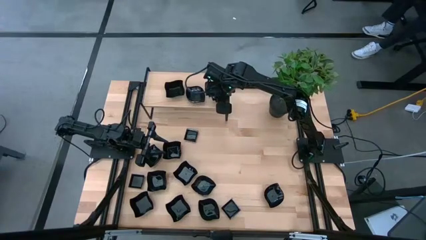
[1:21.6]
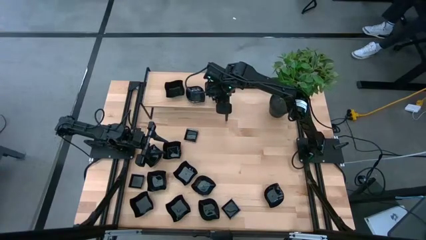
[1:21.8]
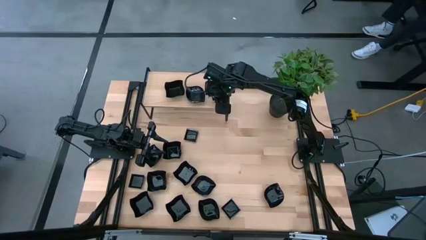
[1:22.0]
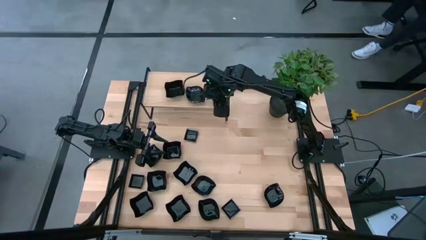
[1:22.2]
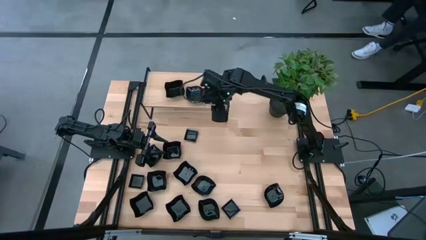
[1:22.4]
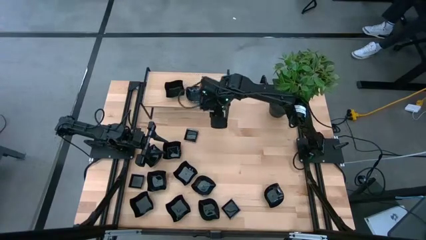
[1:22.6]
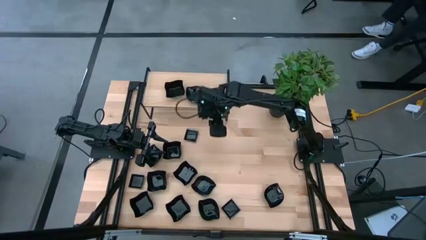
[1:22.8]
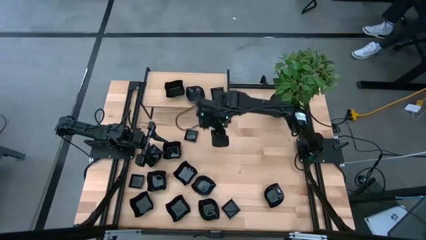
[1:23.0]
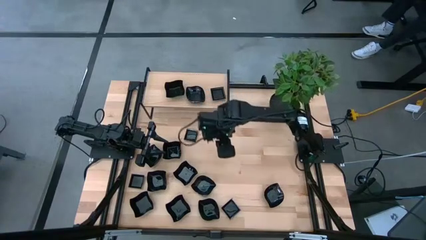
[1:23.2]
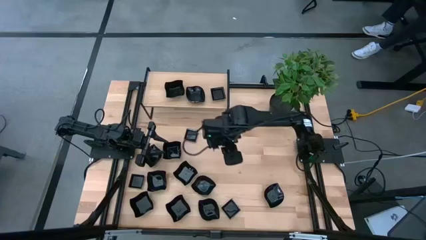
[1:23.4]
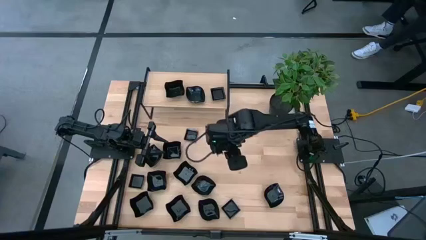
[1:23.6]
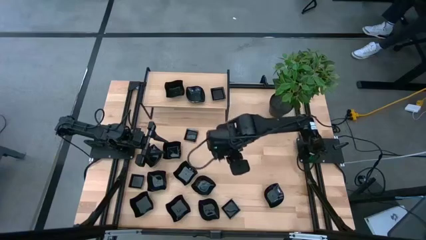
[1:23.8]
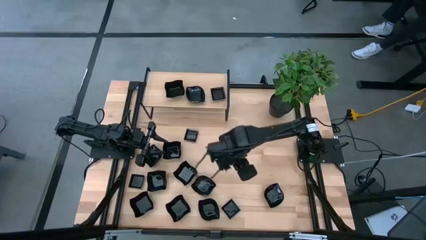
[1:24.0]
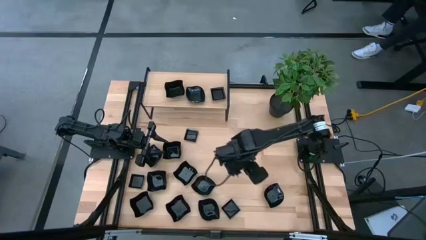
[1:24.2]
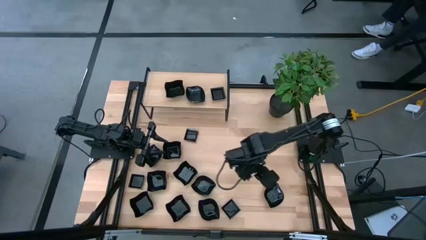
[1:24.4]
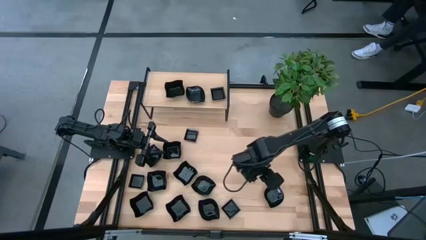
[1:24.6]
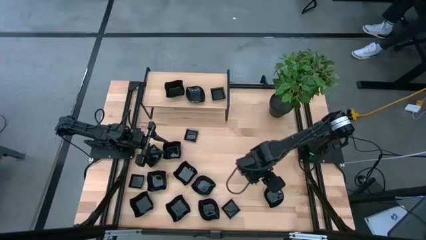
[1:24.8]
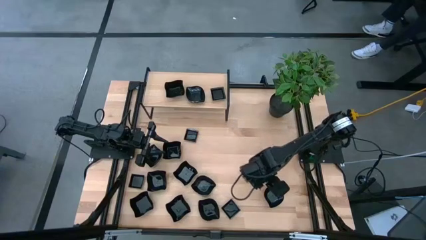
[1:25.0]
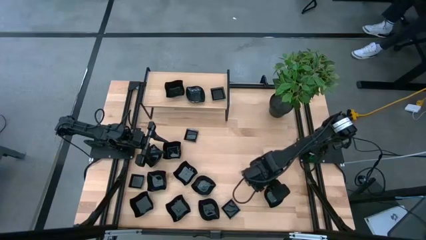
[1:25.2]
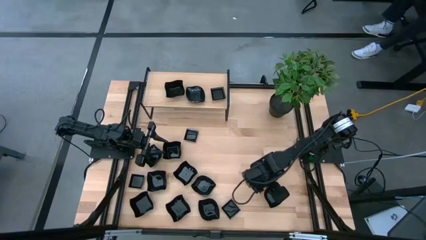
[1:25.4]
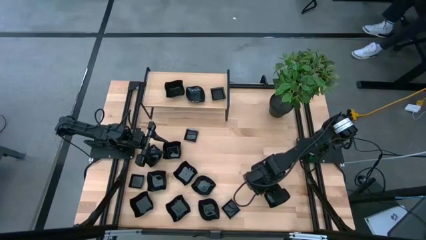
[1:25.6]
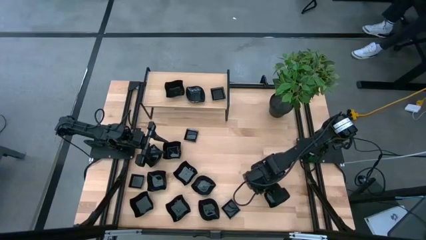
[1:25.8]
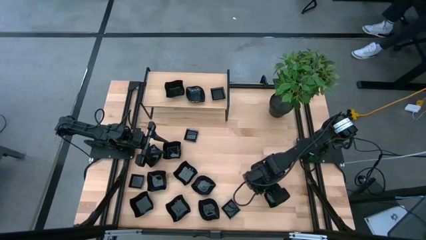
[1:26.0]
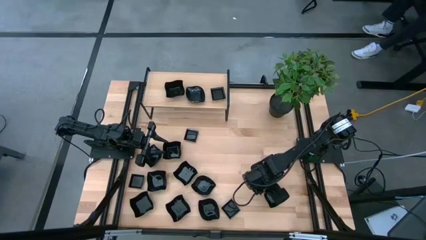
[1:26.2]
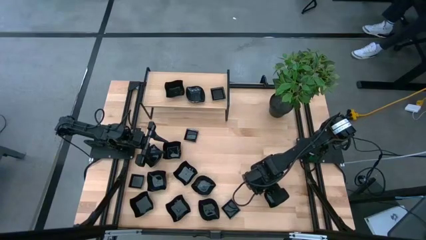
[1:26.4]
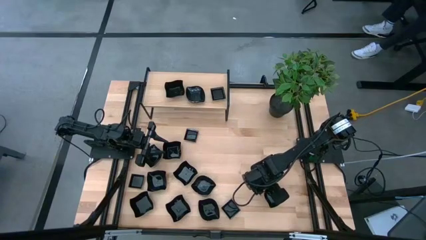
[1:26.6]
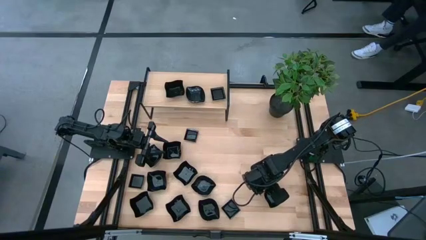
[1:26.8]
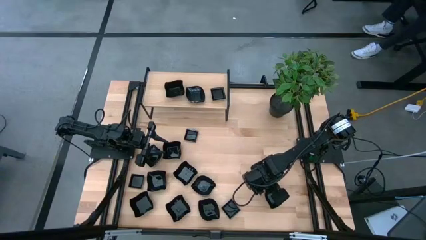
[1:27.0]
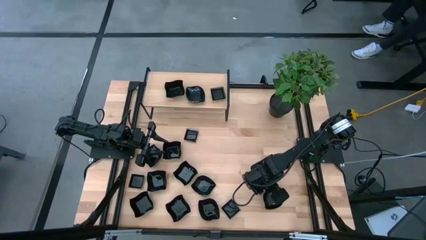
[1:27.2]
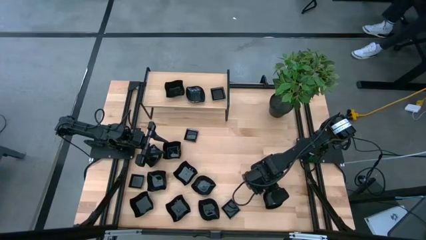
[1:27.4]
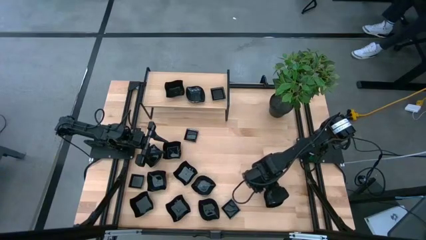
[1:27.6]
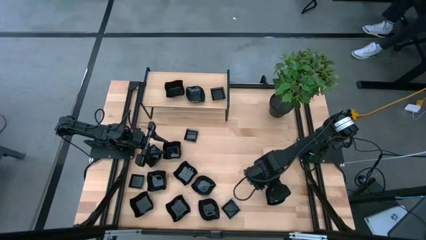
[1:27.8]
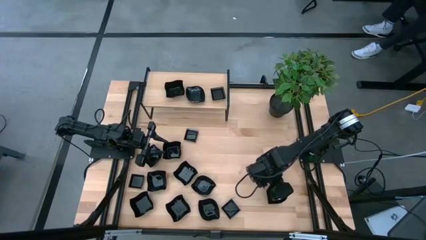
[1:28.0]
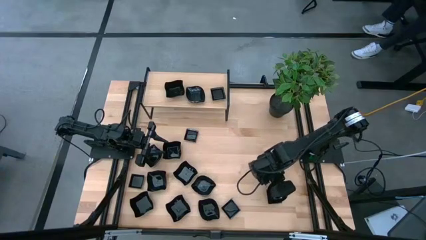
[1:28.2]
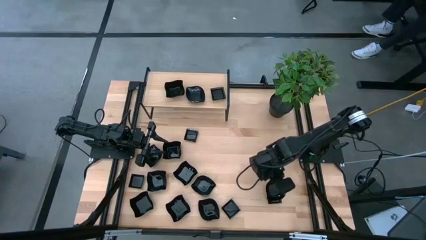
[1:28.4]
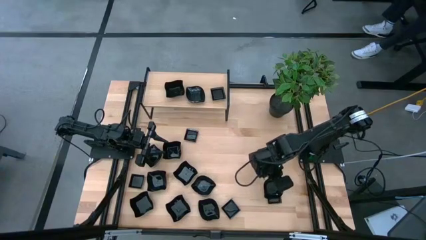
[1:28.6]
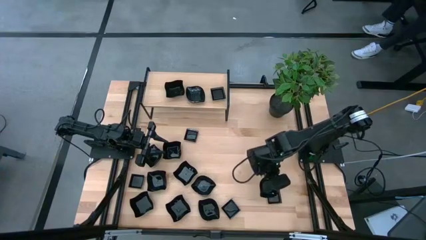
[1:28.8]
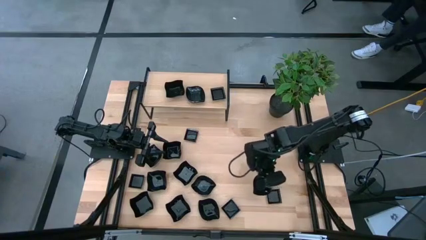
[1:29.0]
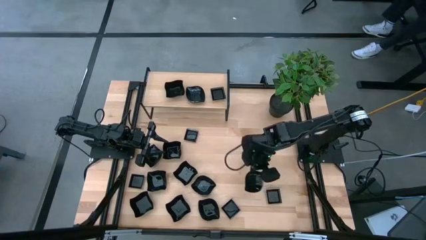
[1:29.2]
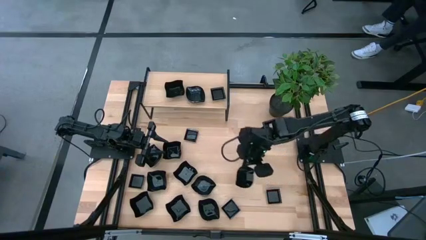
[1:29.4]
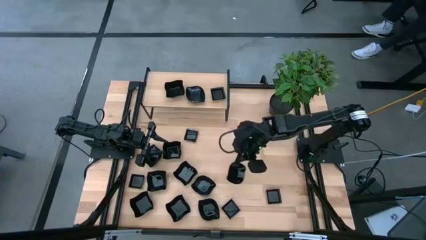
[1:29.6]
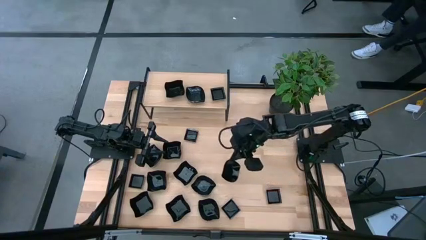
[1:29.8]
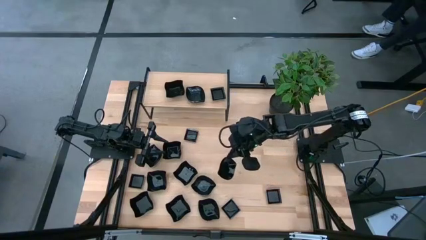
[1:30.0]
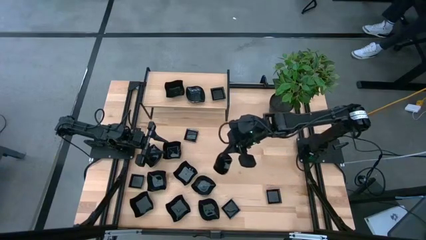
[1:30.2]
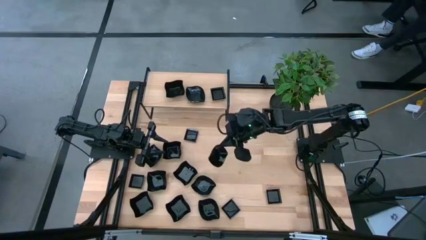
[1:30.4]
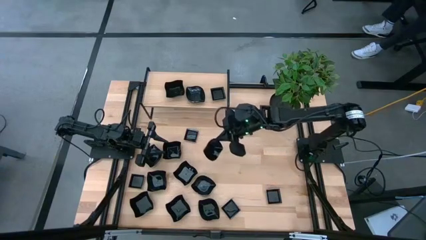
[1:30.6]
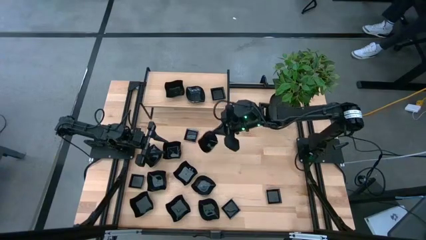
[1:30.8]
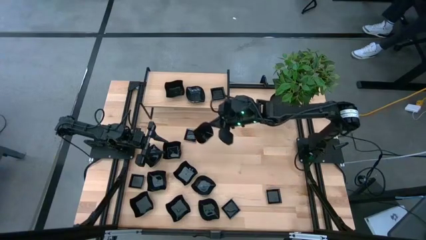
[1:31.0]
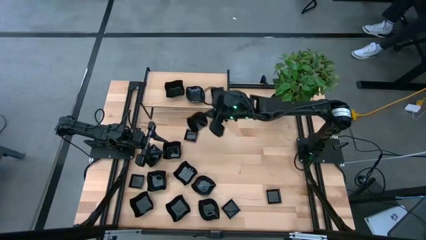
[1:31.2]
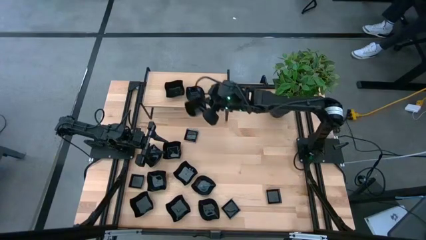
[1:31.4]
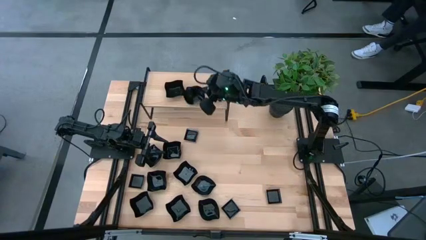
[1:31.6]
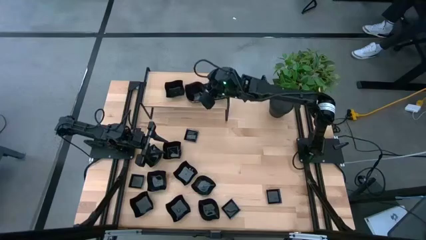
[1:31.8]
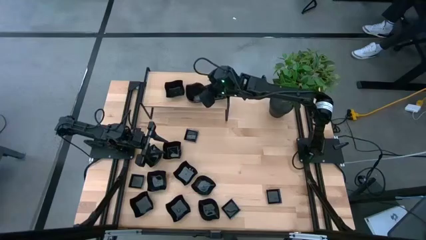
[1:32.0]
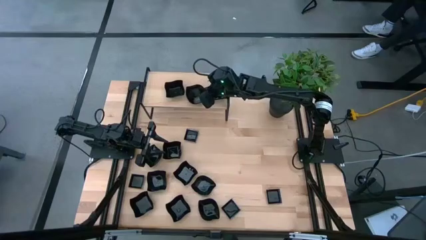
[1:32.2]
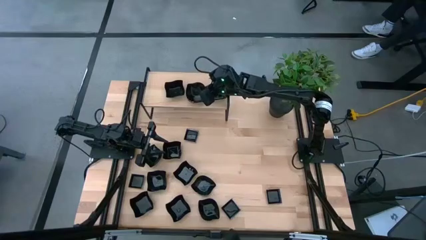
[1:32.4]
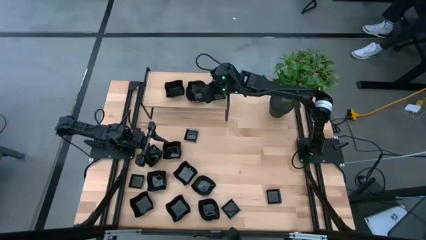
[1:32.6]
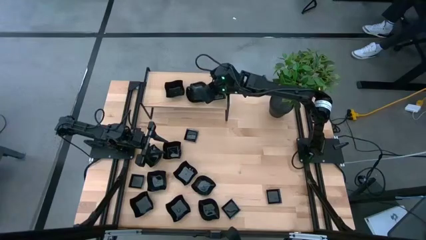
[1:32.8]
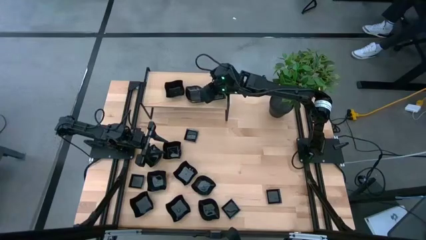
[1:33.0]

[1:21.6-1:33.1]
Task: Pick & Place Mini shaped plates
Stack the leaf shaped plate on top of the leaf shaped plates on the shelf

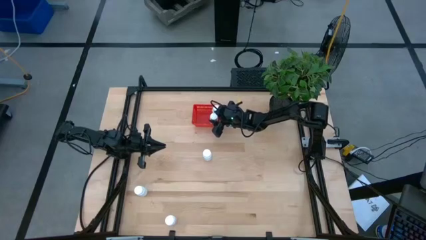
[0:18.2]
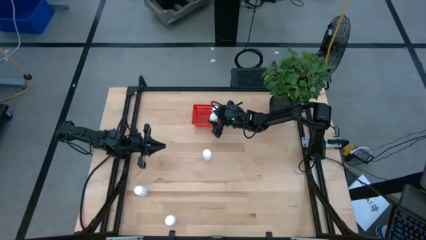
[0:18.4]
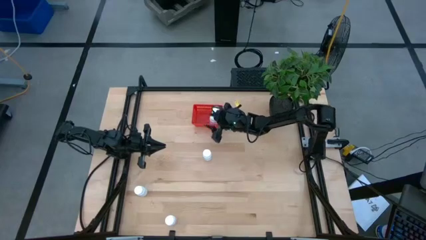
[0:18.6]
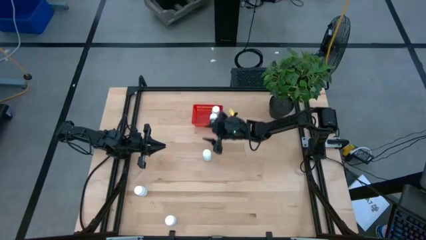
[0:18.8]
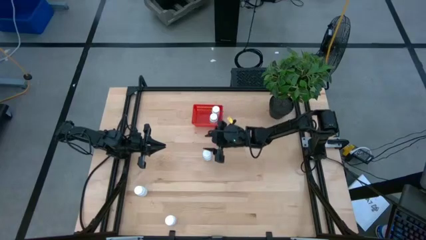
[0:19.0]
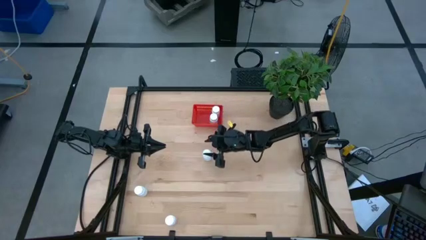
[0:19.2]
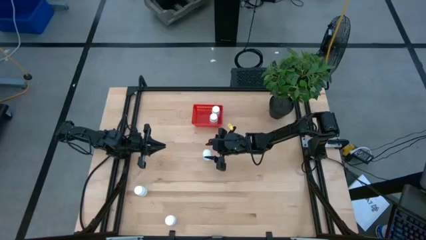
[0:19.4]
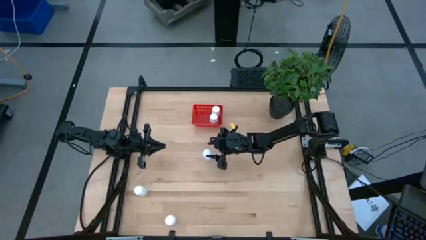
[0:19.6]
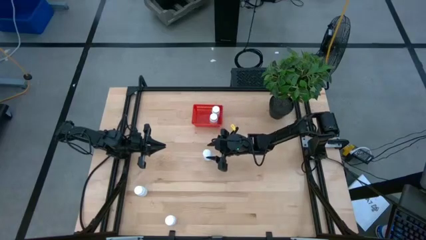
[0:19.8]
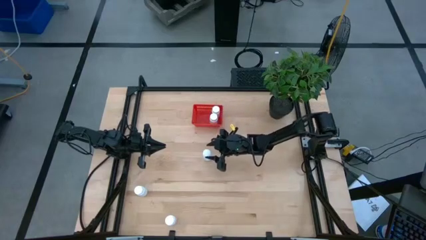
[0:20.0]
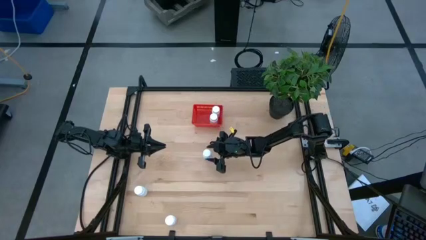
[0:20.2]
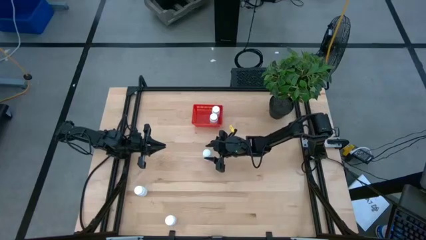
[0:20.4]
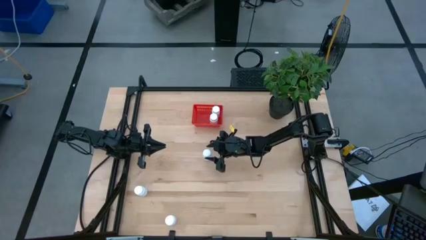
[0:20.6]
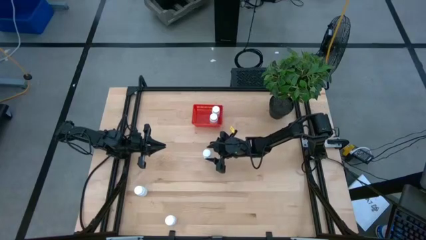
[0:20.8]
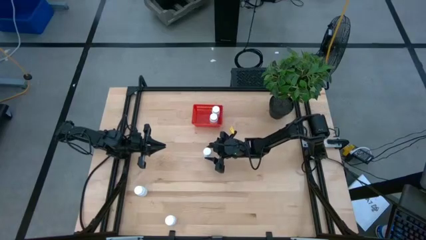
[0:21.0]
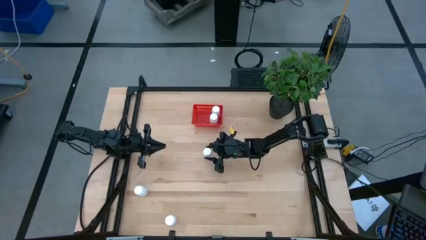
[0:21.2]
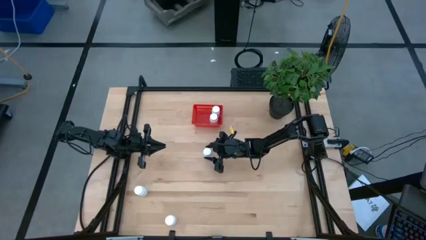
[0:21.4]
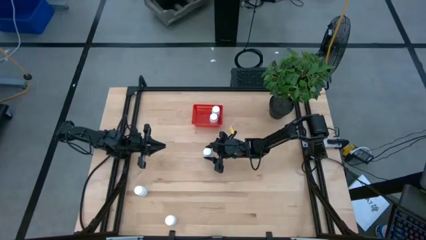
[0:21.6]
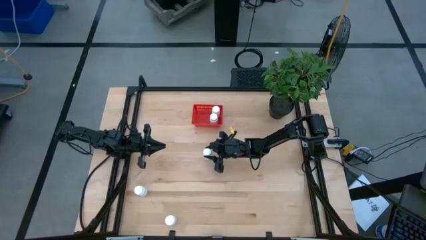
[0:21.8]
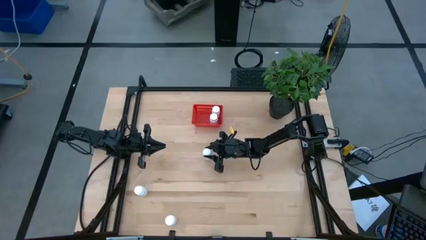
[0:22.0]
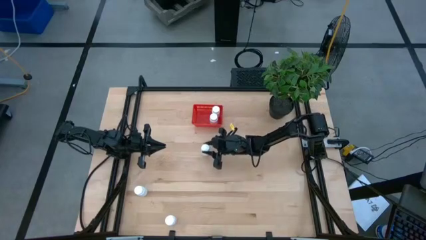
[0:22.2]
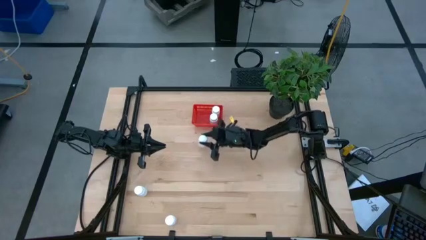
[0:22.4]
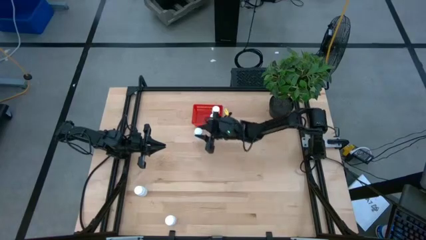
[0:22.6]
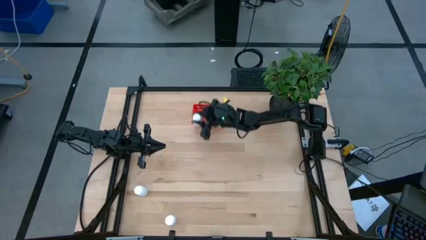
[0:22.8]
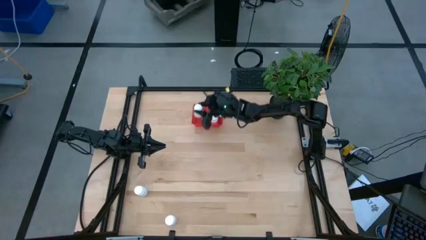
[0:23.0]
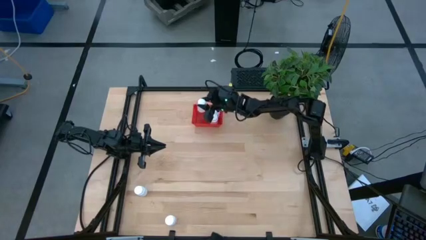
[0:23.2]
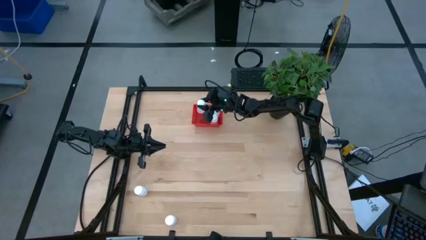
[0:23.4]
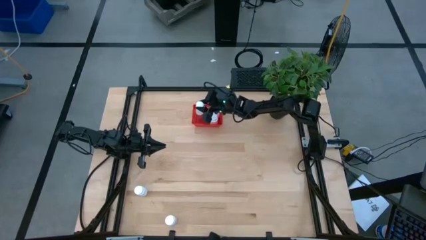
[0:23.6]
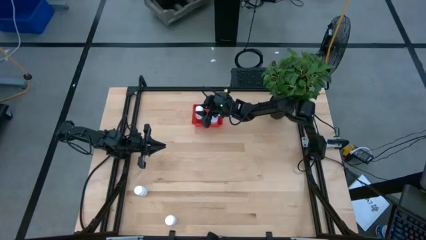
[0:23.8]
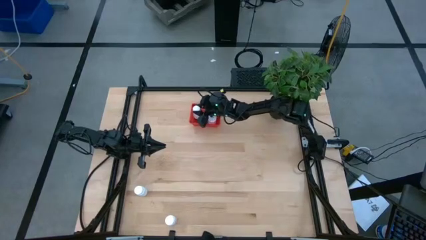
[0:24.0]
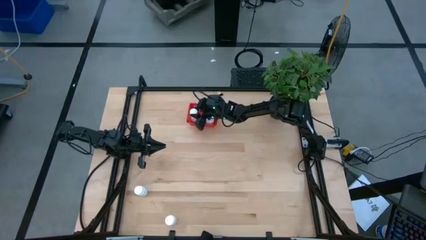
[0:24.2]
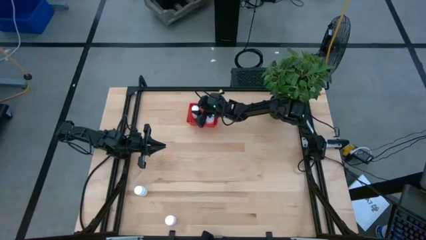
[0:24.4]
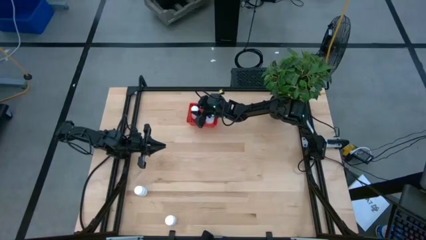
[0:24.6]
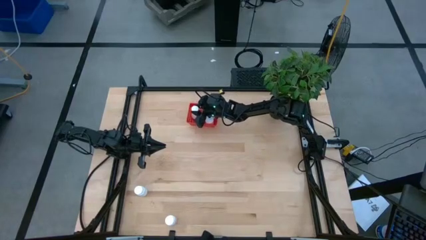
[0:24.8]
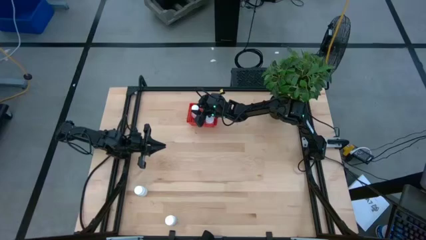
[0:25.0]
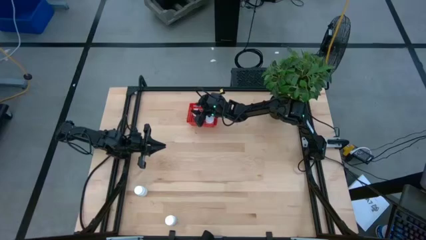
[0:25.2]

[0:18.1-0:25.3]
Task: Pick and place pill bottles into a basket
Put the white pill bottle into the orange basket
